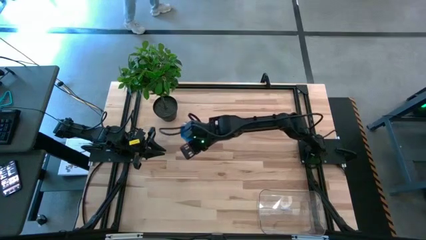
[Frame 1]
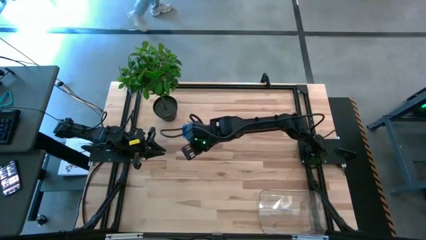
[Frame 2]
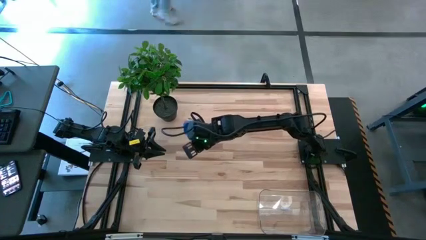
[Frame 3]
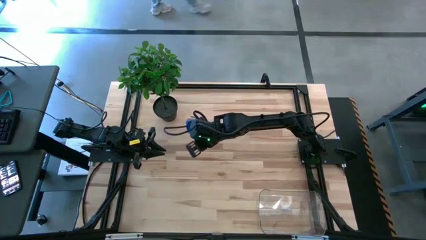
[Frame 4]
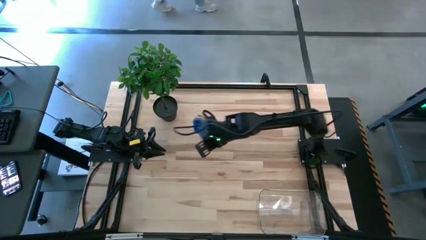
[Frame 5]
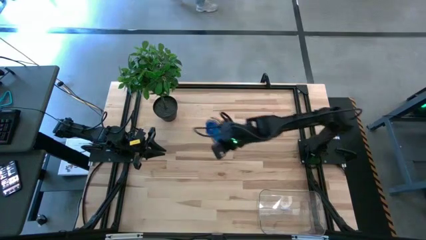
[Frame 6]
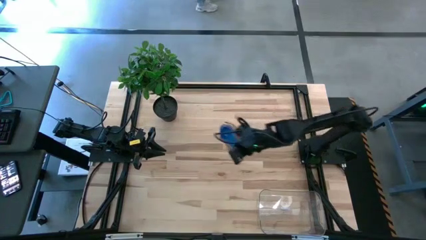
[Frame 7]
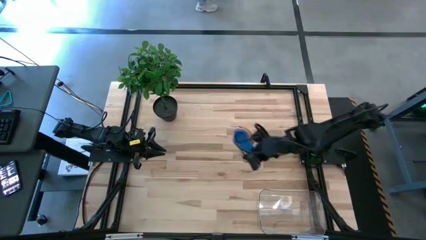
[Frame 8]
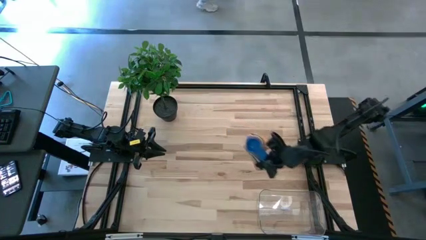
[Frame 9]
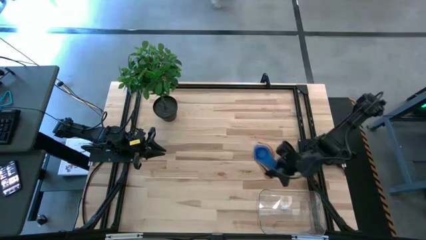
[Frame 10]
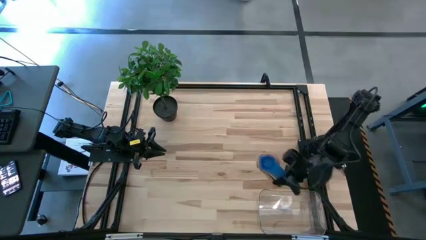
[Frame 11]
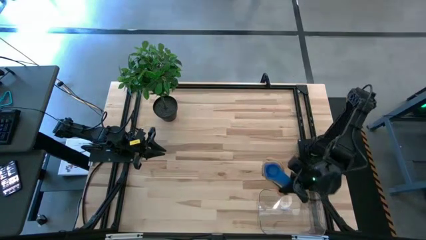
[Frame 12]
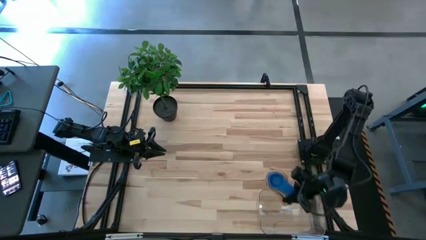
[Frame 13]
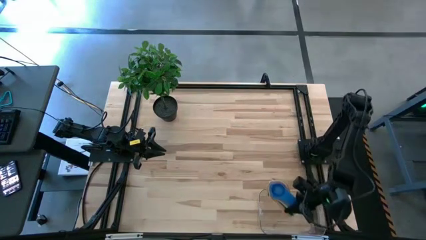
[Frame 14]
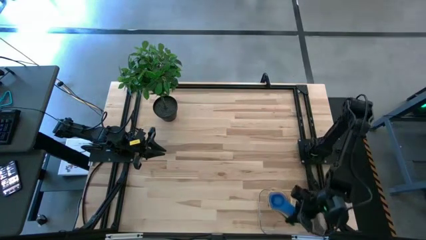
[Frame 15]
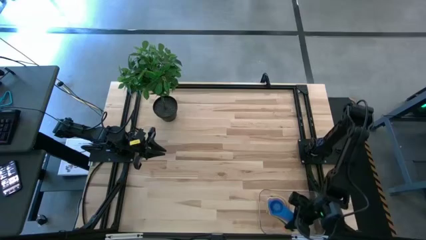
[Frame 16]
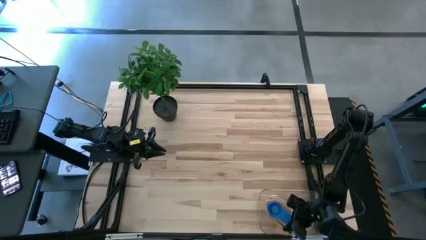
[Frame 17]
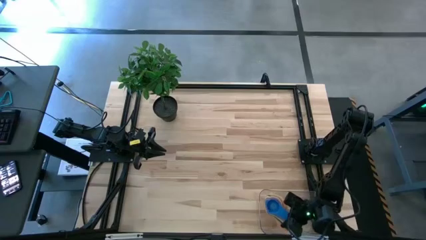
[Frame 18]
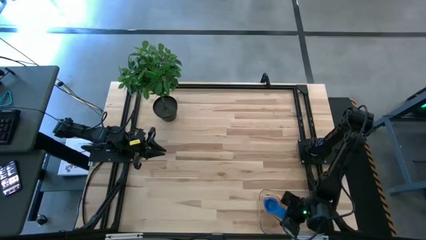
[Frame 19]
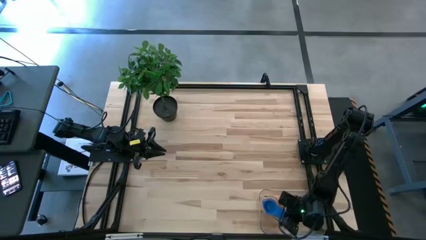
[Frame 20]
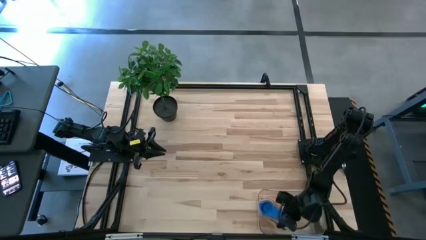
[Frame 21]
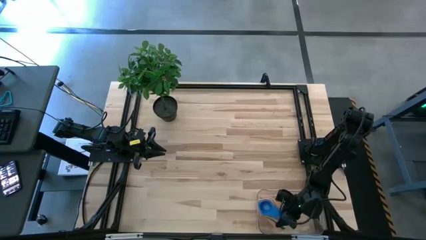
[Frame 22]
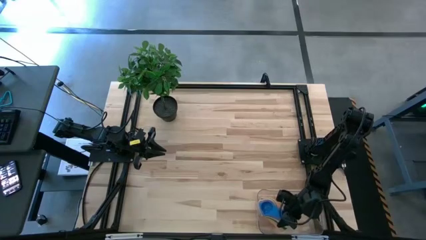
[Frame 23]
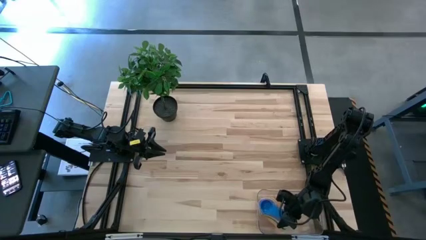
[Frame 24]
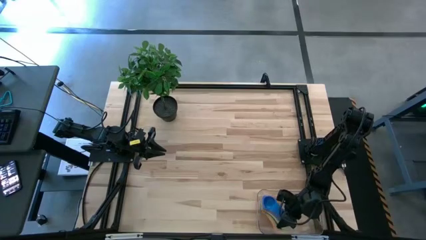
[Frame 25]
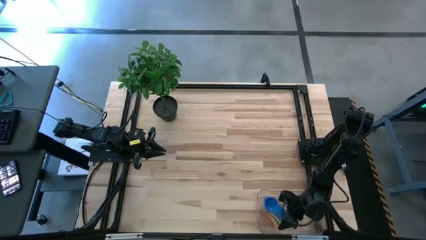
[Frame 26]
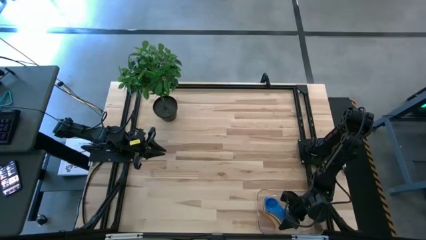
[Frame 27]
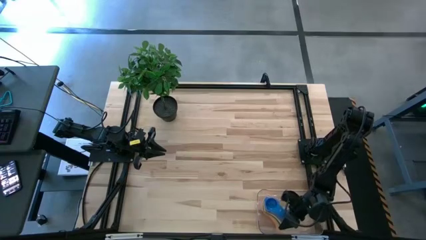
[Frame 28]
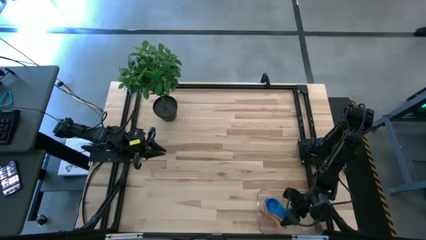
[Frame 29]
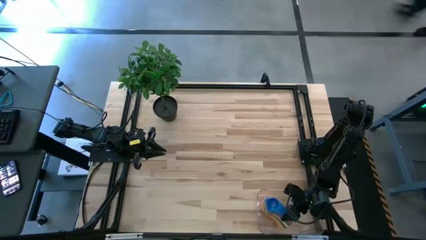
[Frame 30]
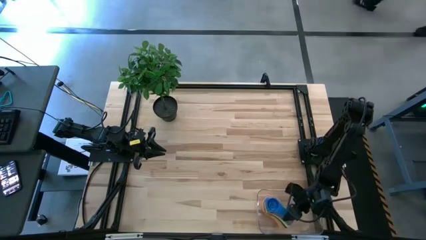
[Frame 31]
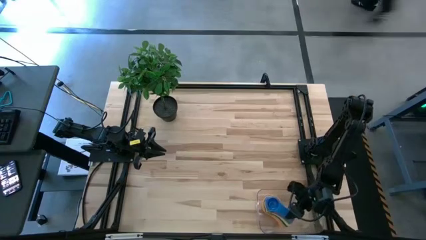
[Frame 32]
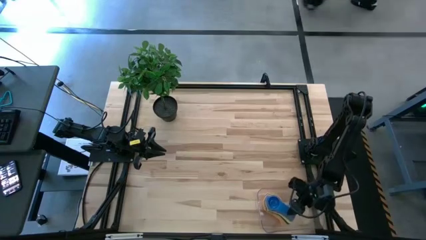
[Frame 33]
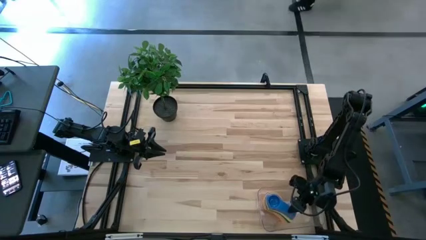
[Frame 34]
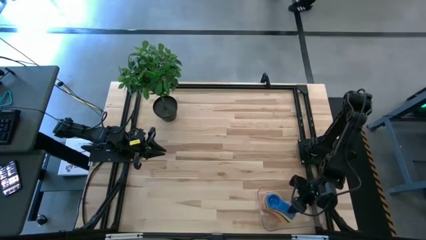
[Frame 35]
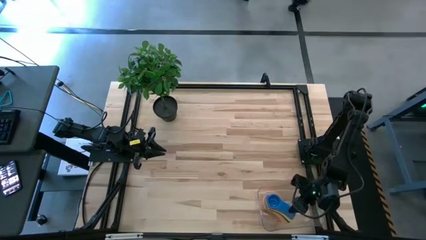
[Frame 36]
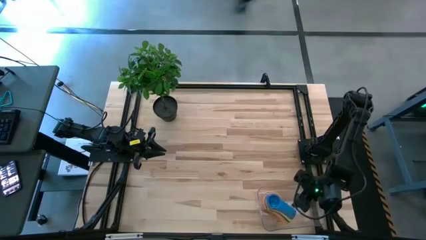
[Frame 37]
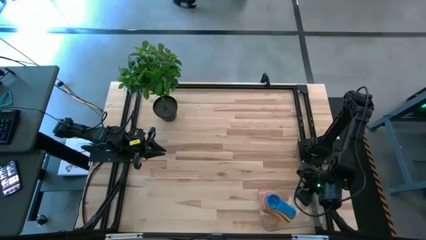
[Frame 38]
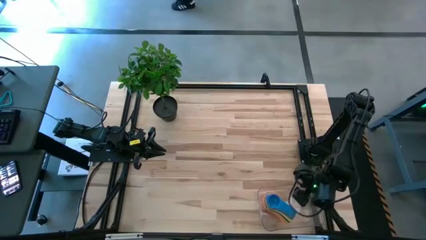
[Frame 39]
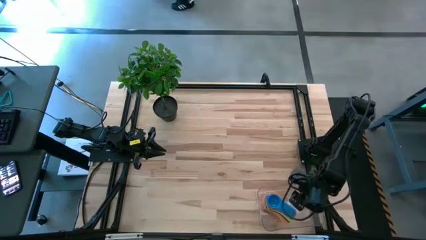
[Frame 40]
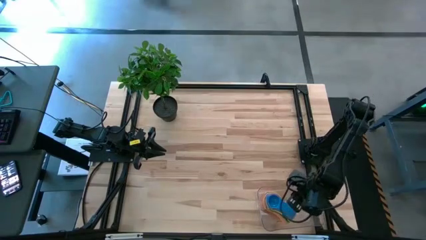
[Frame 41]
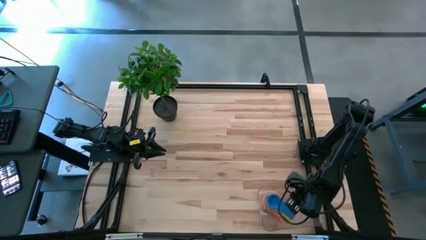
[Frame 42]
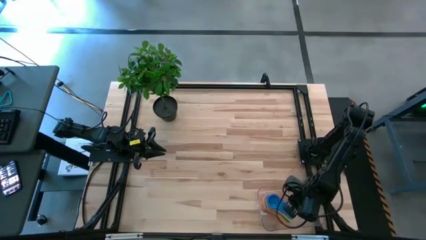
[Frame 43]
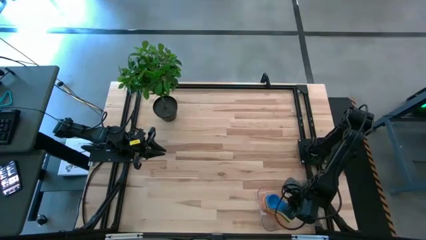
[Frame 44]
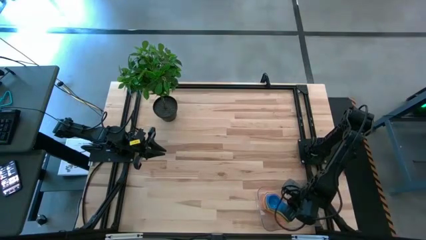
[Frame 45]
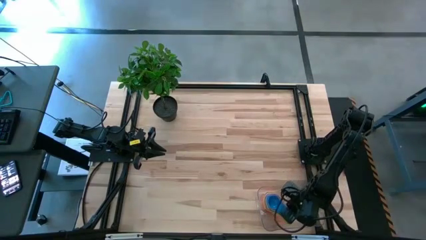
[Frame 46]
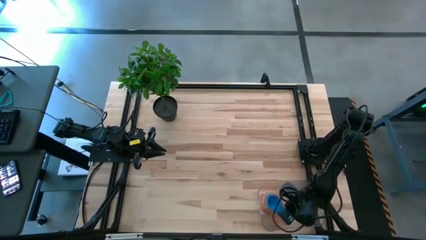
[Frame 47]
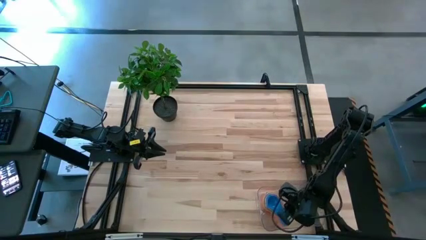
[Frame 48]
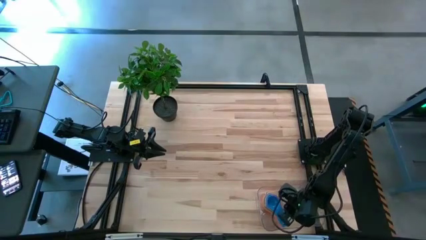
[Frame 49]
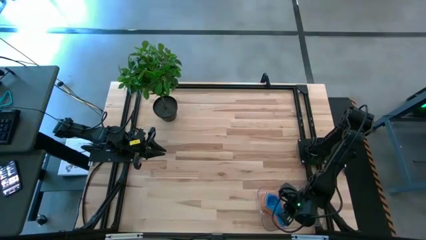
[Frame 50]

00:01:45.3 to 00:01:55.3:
Task: Nest measuring cups in basket
Put the stacked measuring cups into the transparent bin

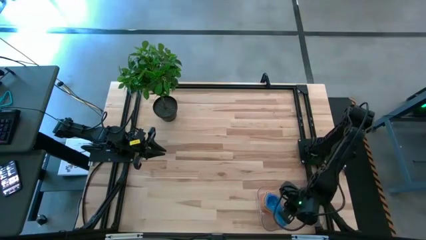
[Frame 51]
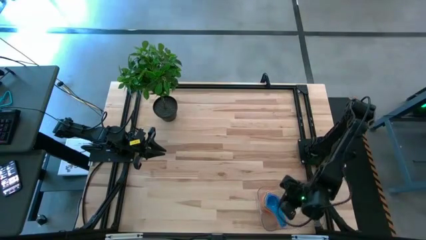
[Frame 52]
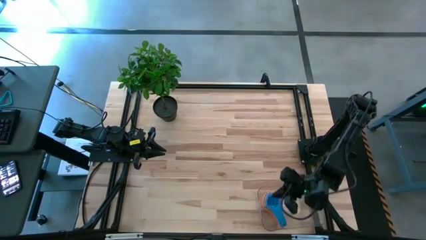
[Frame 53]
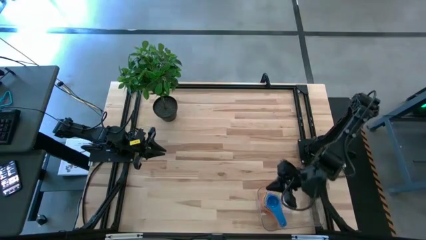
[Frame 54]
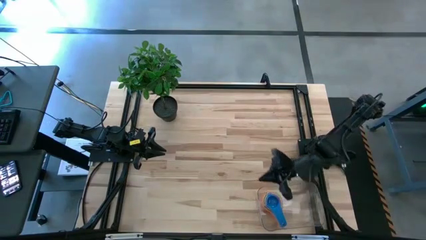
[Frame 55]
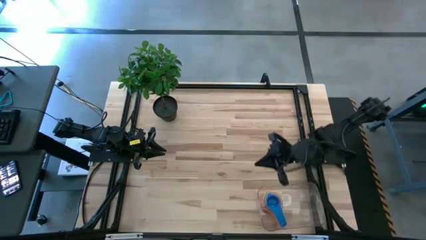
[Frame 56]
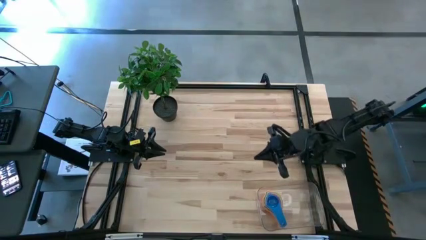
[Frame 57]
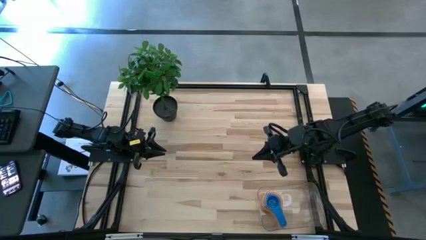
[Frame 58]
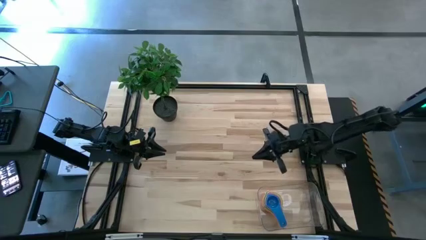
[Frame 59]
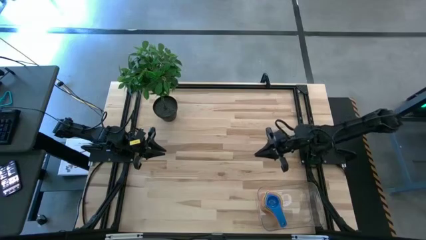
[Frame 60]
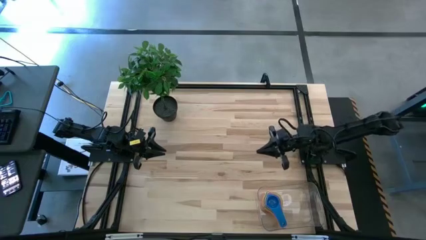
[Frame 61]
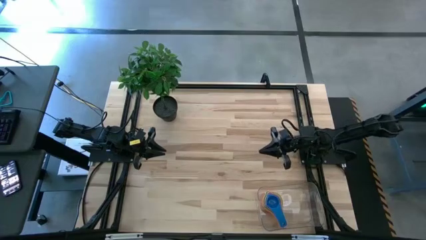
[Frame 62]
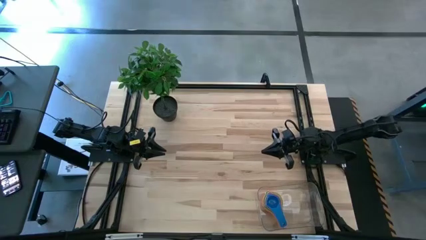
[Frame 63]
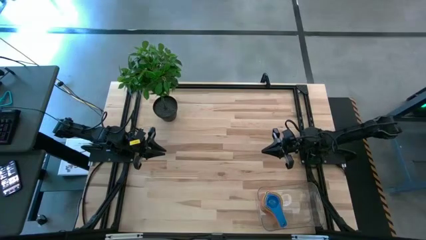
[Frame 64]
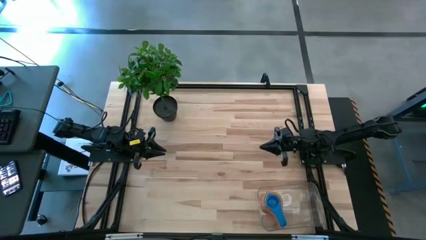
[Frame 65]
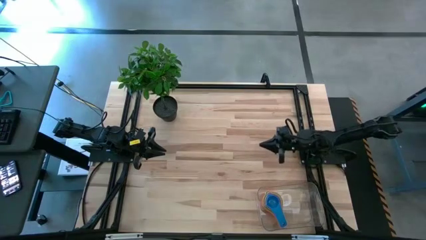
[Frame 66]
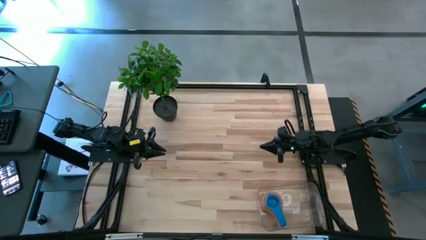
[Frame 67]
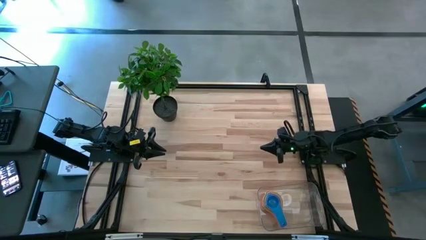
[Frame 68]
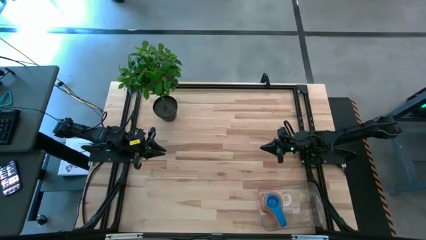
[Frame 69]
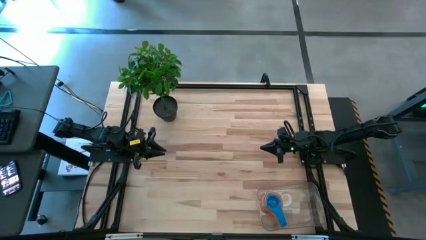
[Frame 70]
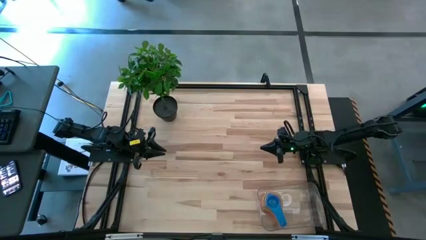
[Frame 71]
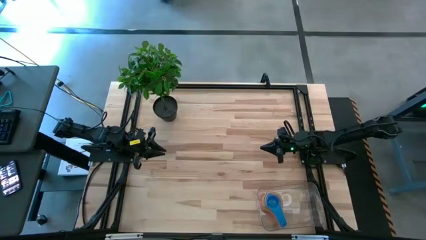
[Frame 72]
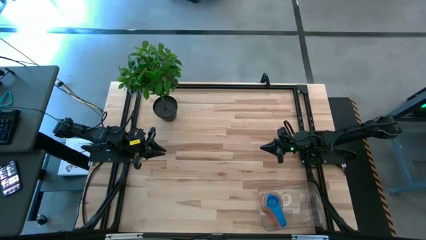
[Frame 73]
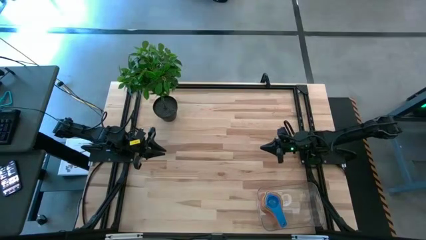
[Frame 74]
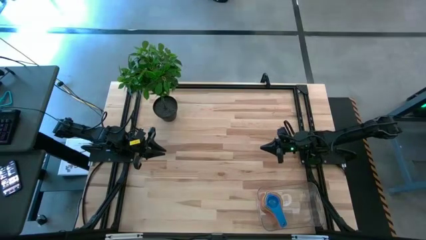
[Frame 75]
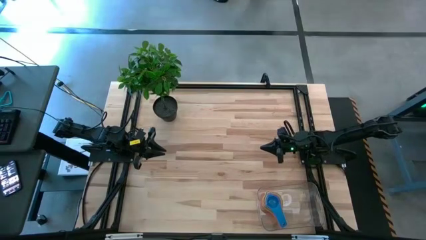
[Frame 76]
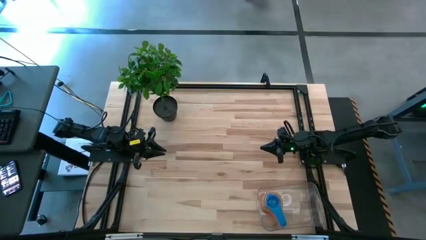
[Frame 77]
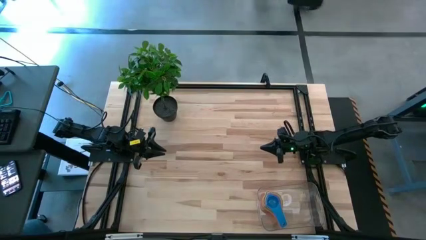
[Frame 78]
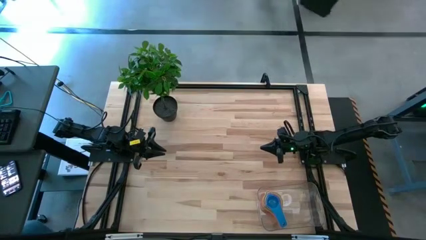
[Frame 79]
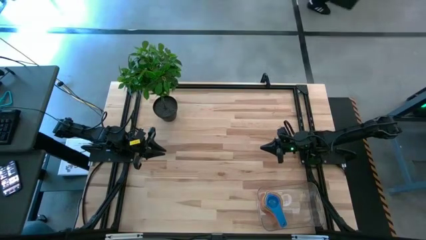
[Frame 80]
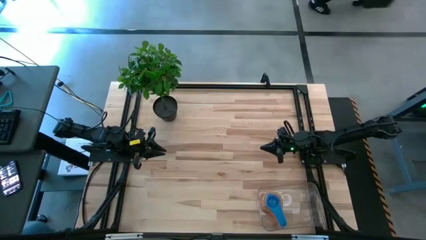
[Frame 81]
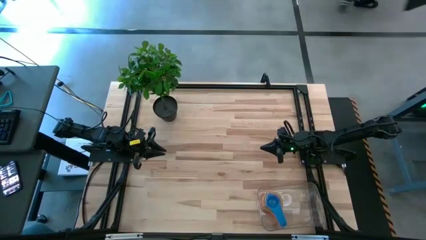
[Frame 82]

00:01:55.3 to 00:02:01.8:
Return to Home Position
